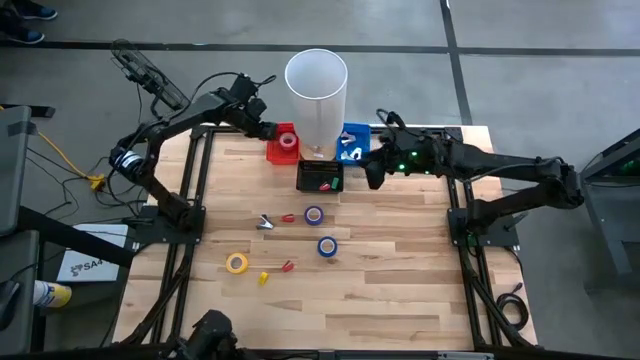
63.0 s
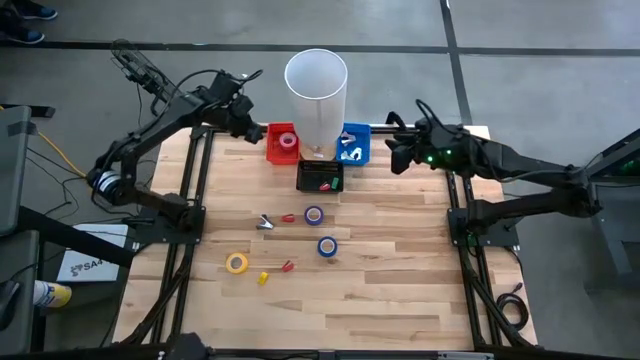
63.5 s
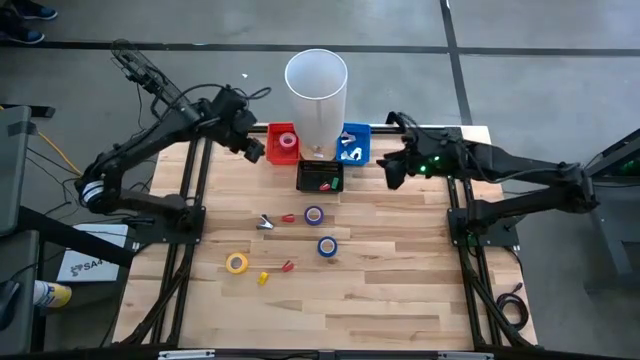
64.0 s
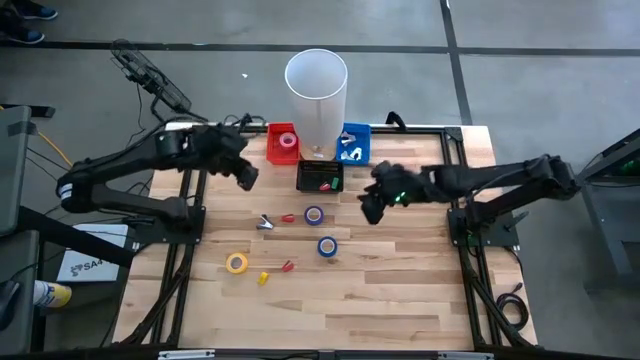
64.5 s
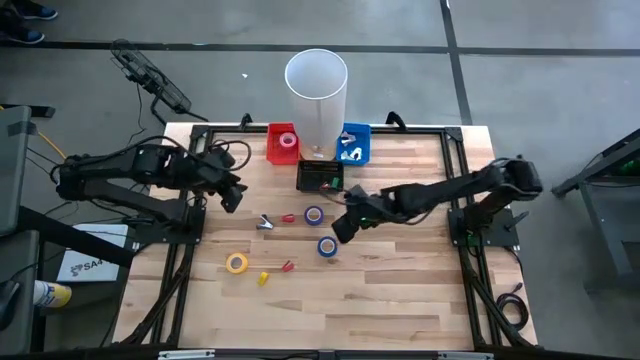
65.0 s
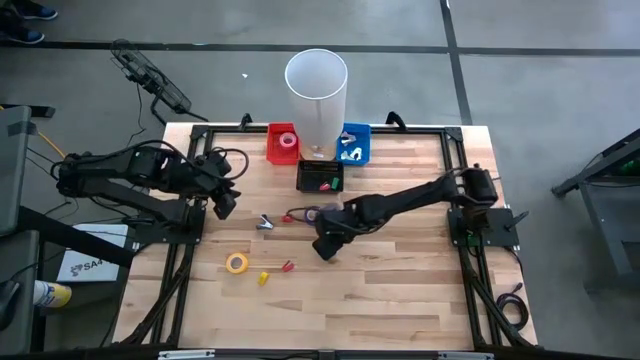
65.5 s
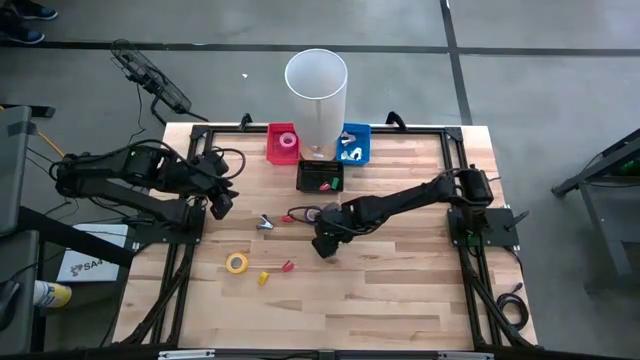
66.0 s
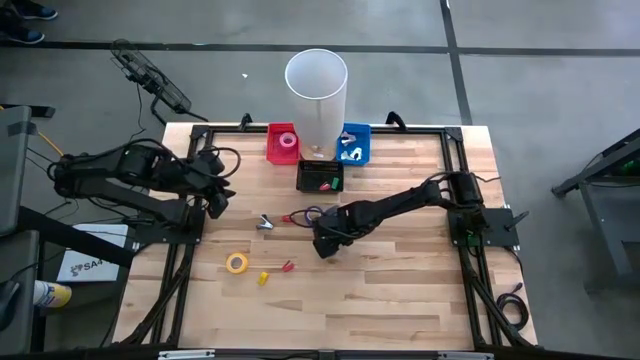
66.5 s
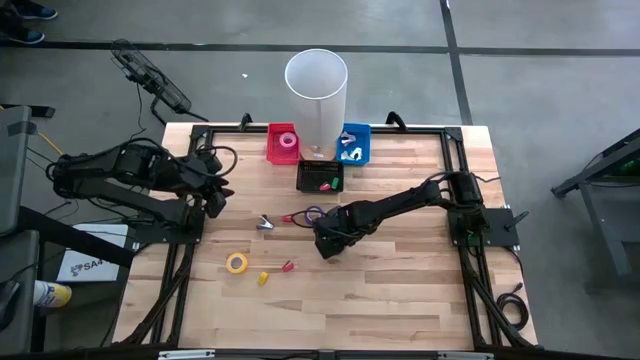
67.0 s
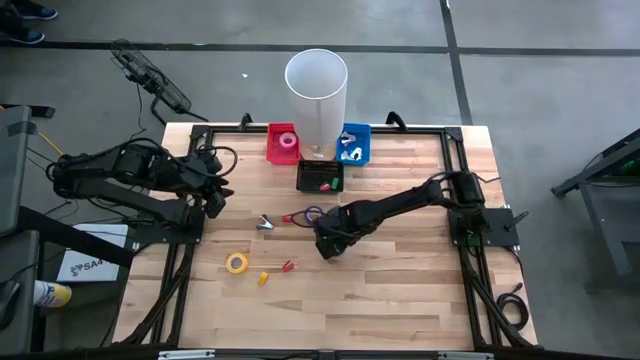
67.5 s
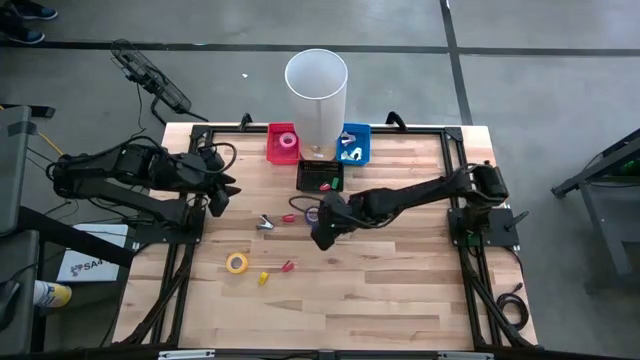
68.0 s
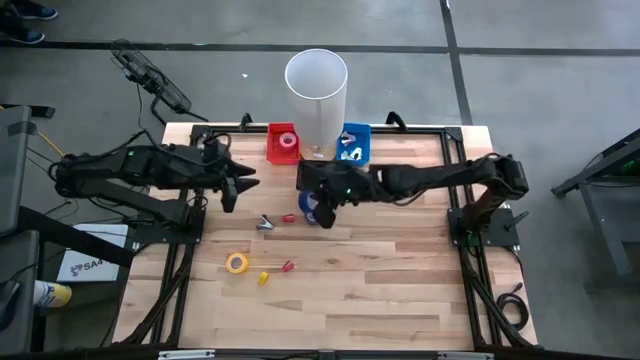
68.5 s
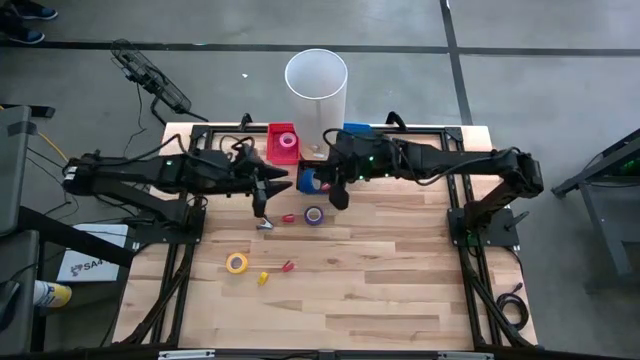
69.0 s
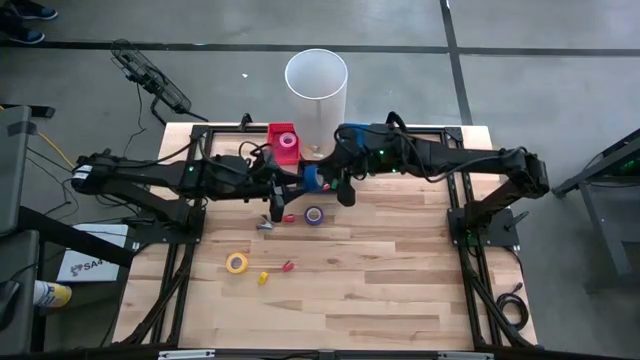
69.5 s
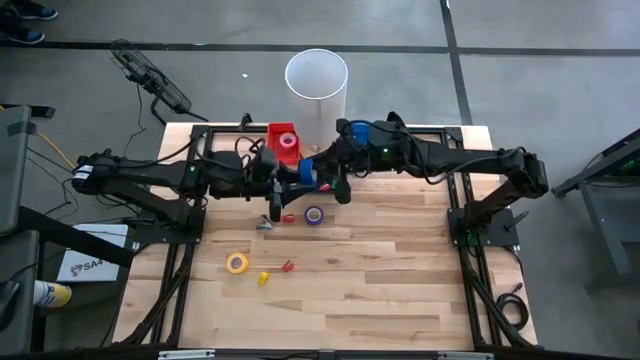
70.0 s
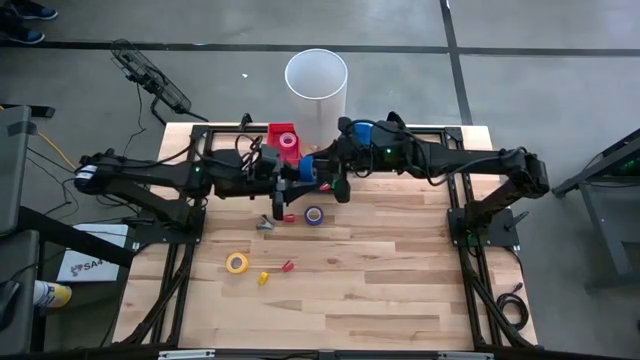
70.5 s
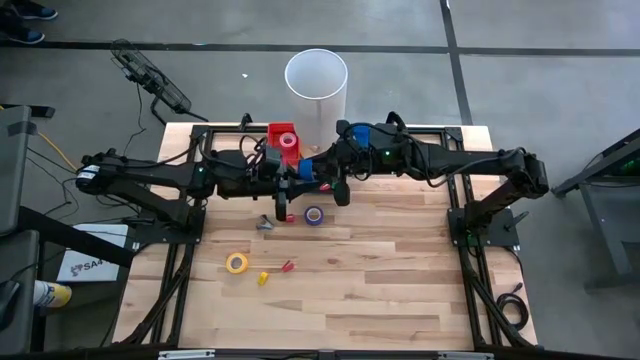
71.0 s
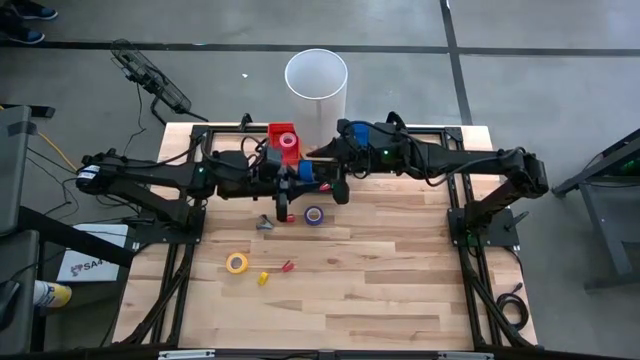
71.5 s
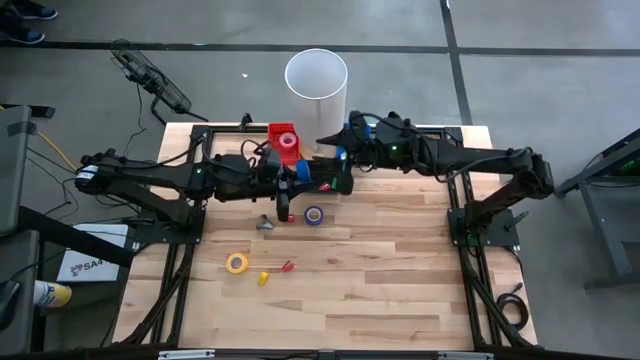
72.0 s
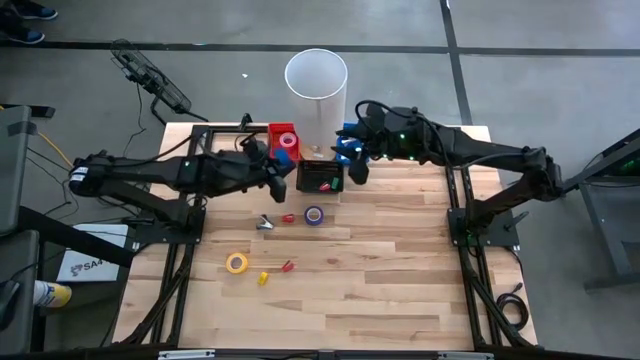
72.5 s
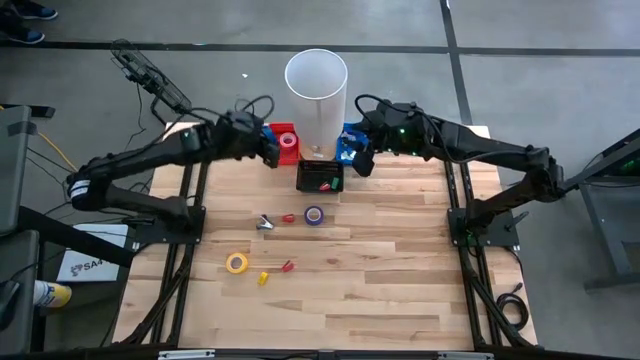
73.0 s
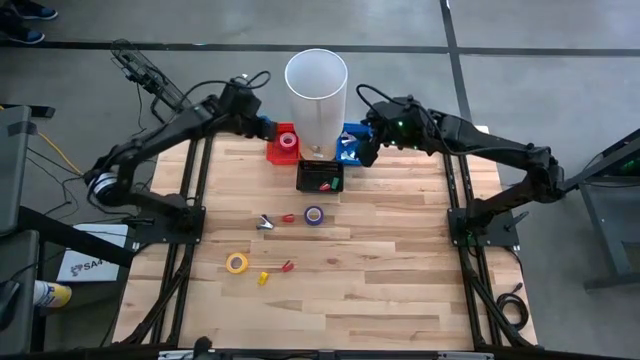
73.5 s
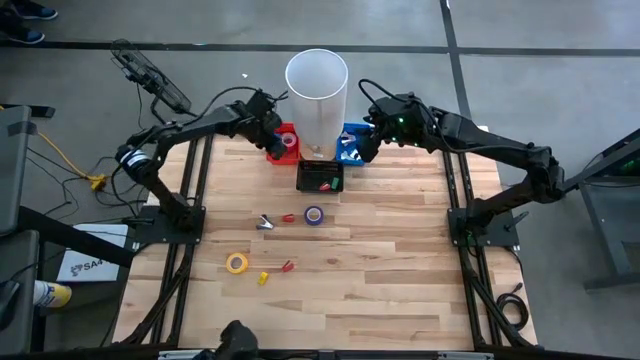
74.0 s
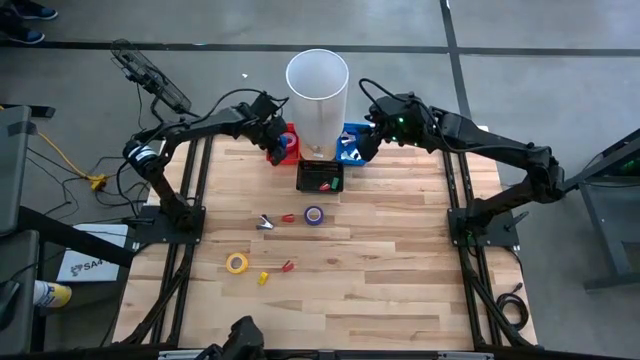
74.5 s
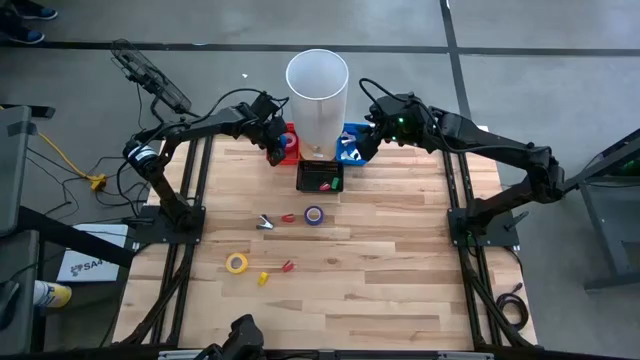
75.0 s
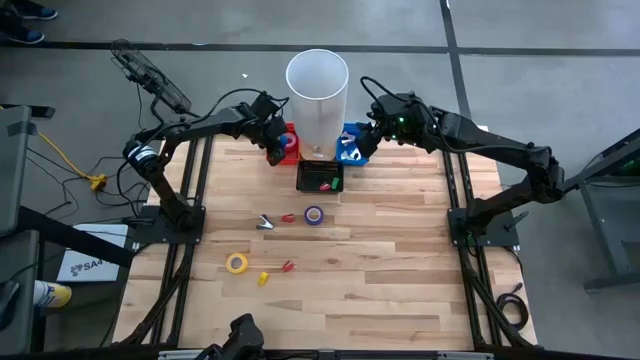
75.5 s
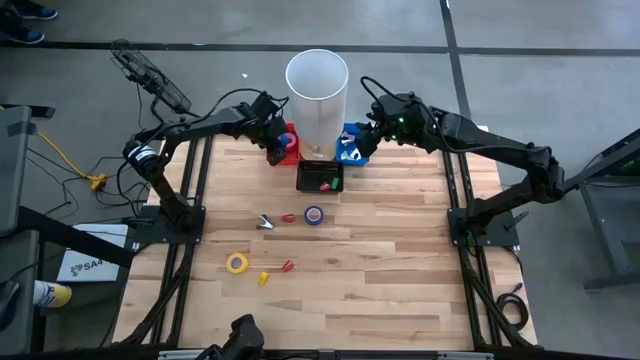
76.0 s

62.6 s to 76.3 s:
Task: Pick and place Stapler, Stapler remover, tape
Put the blue tape into the red bin

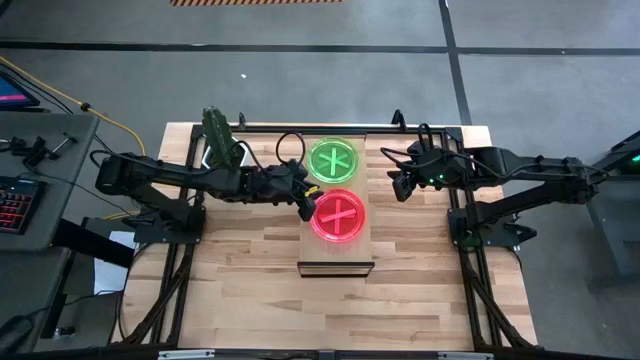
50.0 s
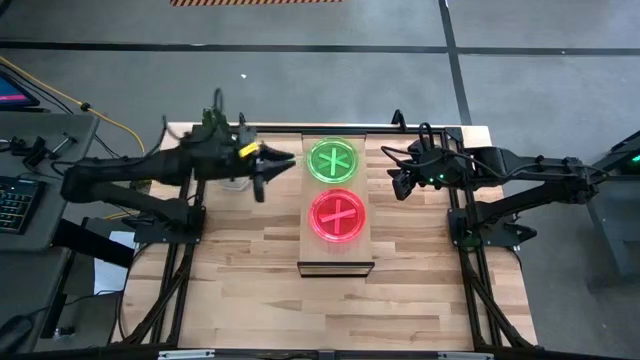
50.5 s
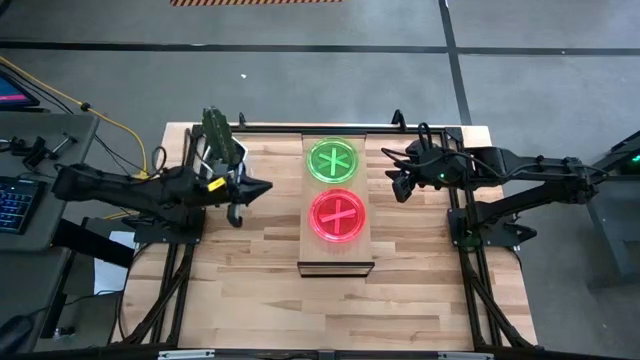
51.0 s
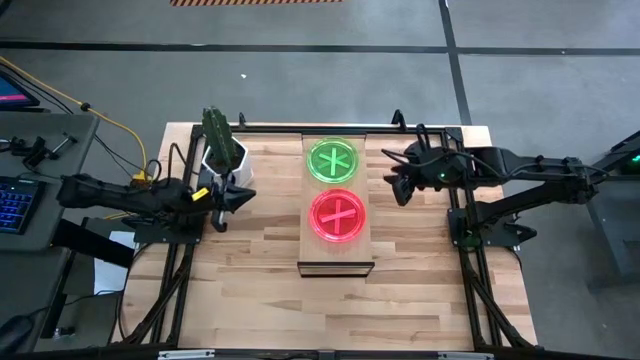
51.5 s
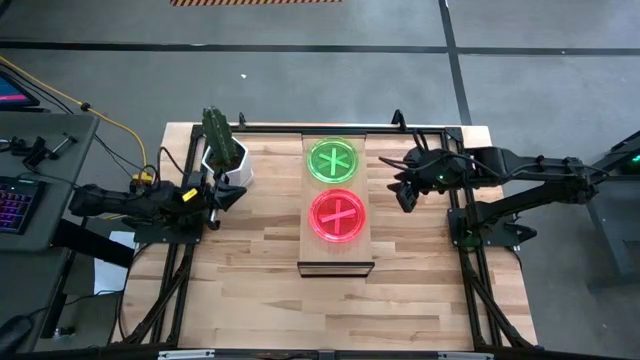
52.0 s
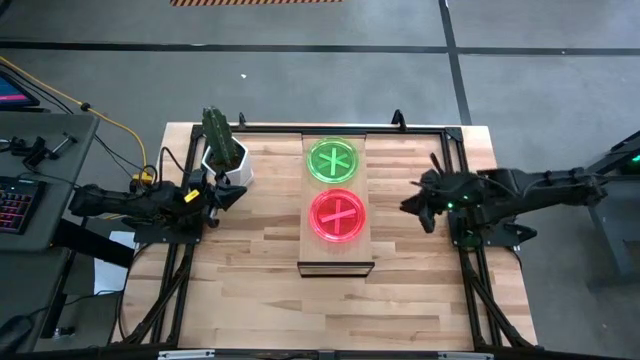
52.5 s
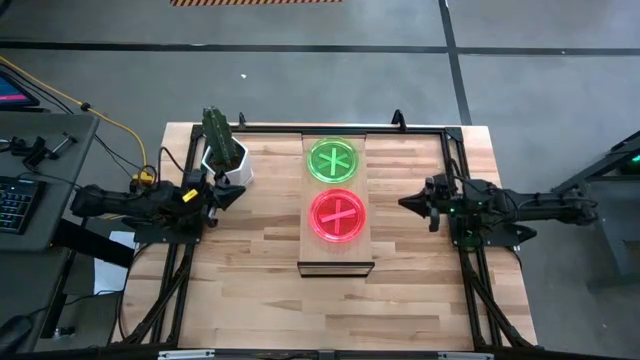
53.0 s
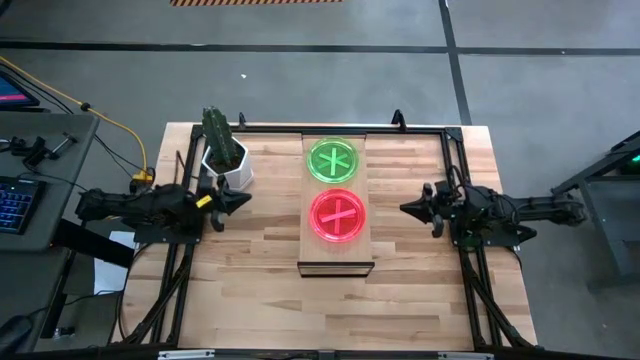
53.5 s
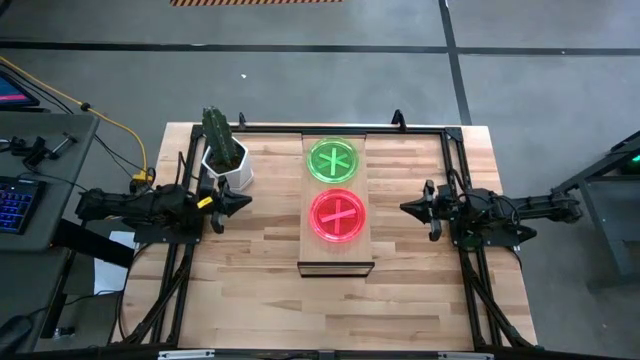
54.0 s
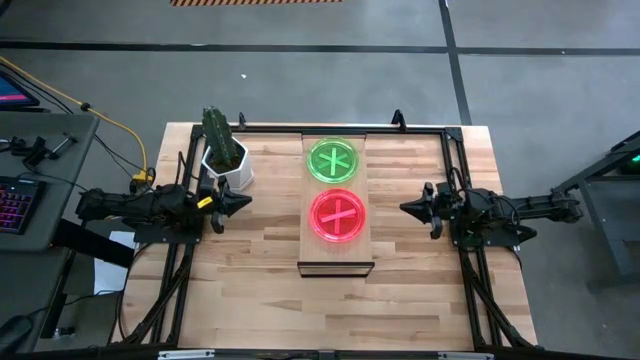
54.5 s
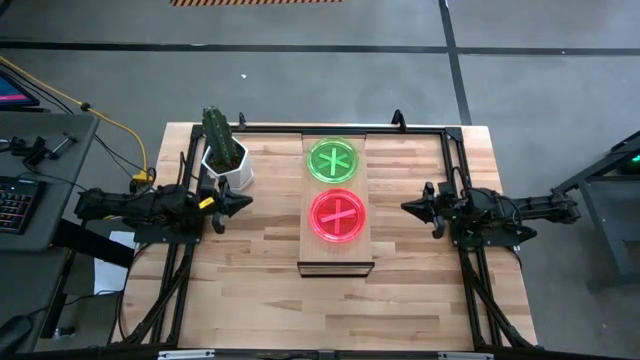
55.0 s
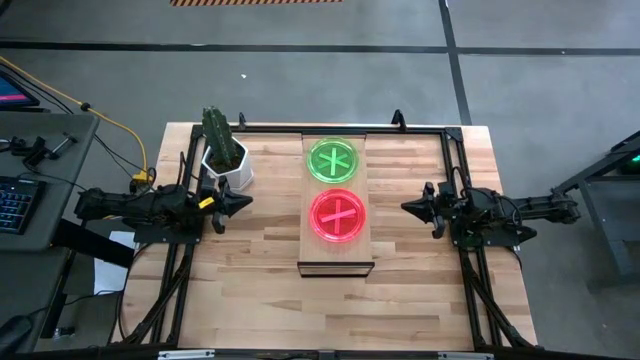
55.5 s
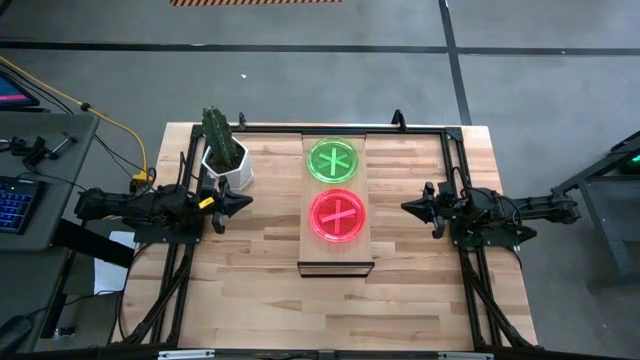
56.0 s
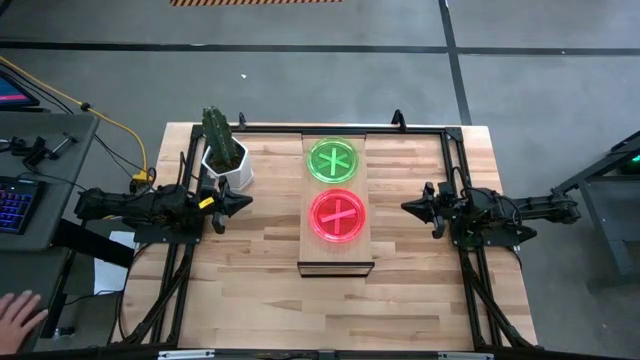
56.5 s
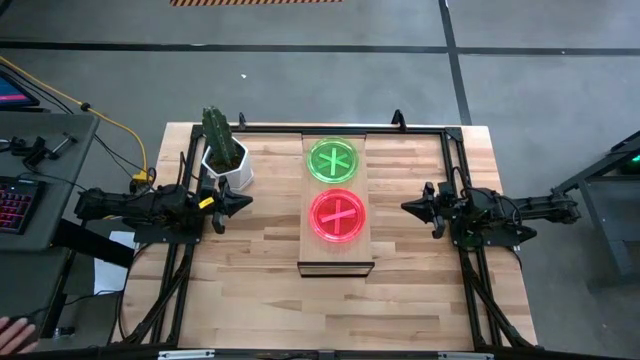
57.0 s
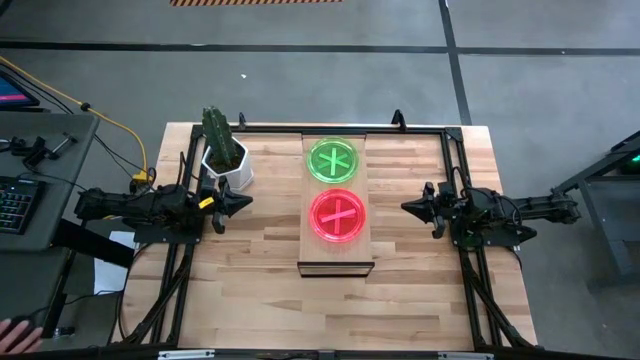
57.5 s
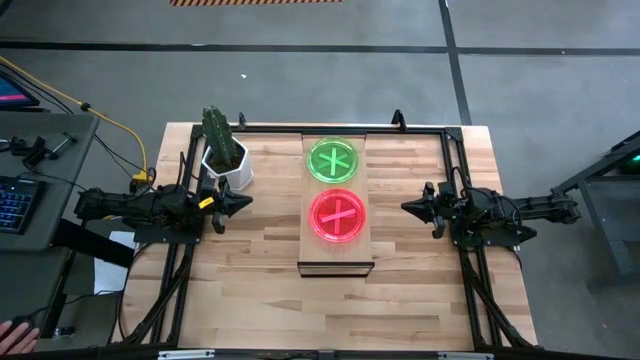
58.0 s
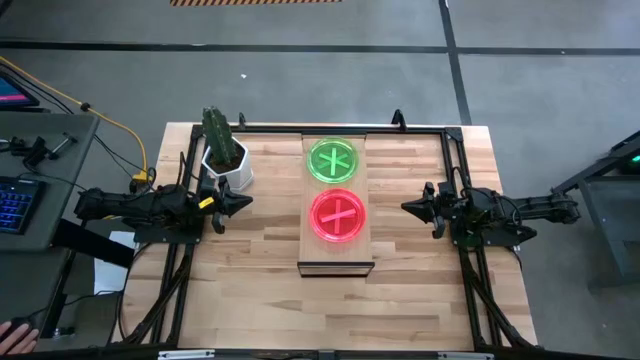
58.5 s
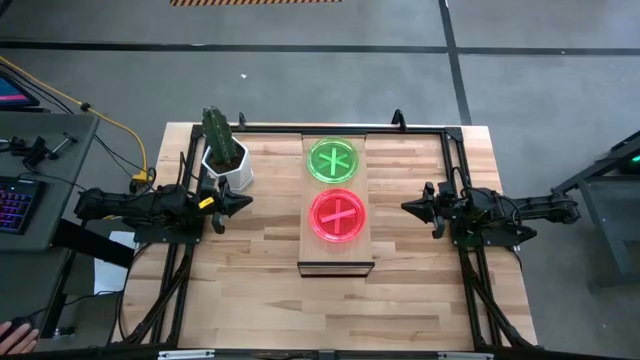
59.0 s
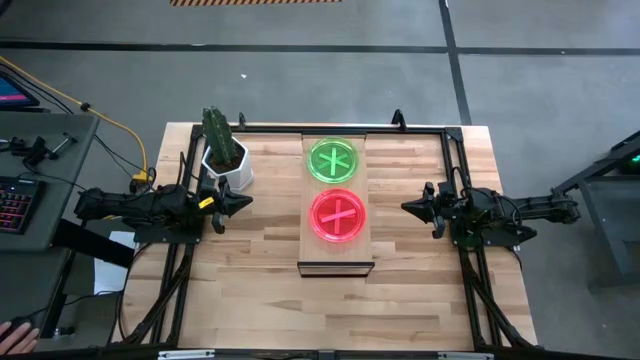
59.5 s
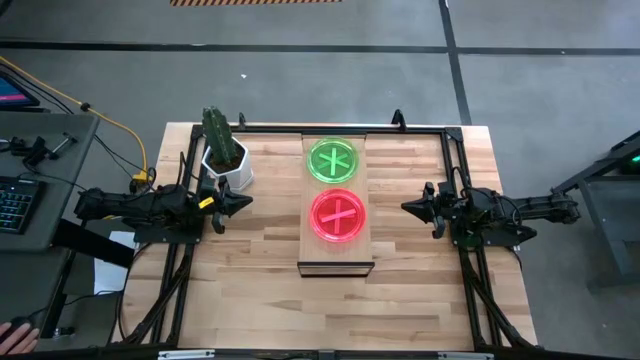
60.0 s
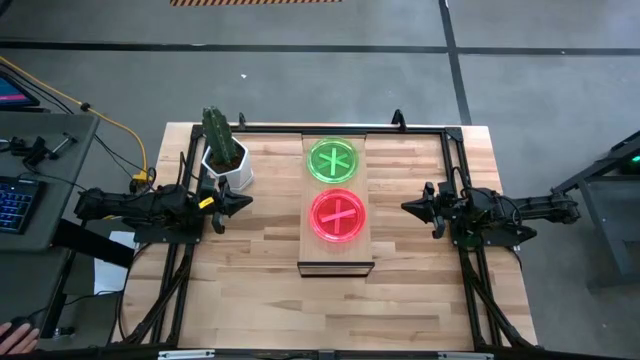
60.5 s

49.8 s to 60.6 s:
Task: Place and stack plates onto a shelf
Return to Home Position
